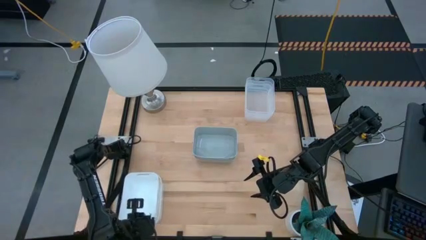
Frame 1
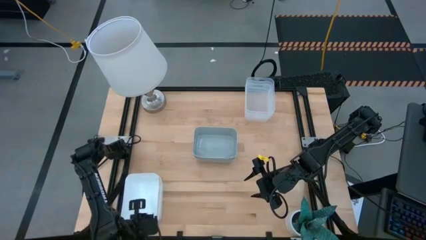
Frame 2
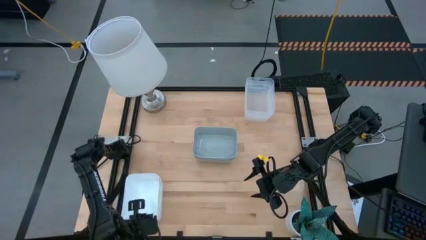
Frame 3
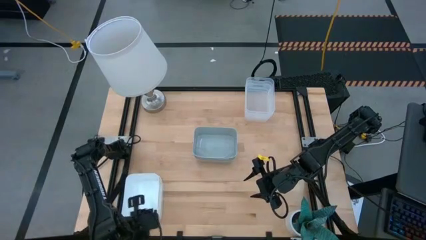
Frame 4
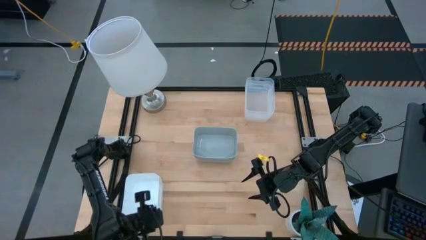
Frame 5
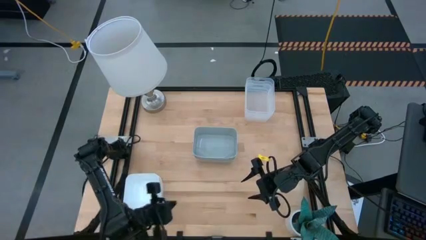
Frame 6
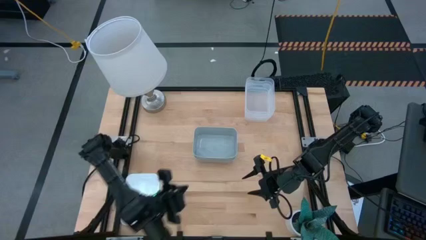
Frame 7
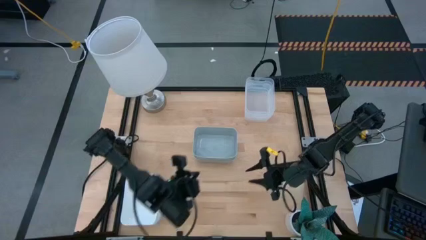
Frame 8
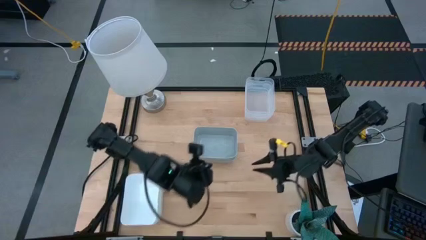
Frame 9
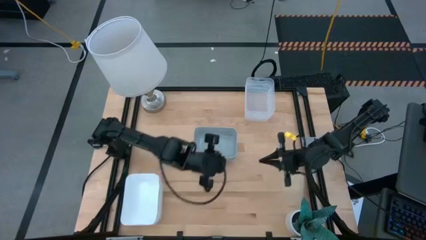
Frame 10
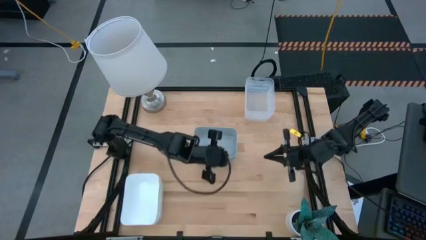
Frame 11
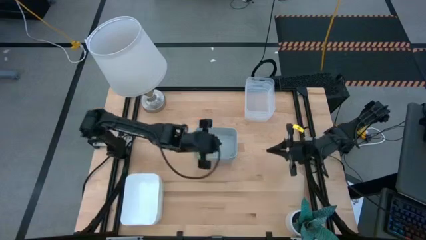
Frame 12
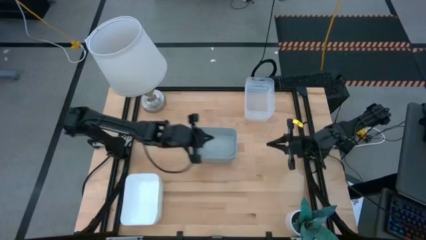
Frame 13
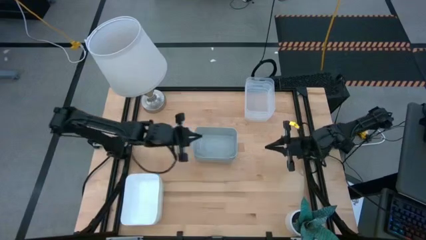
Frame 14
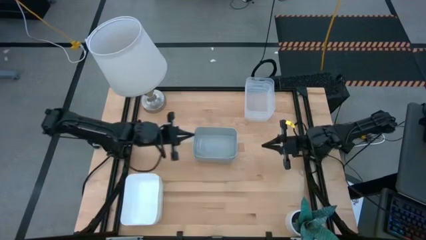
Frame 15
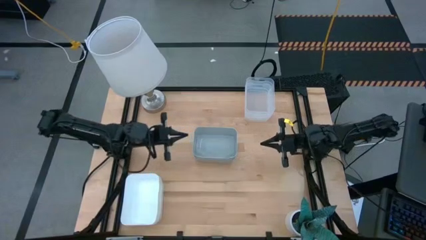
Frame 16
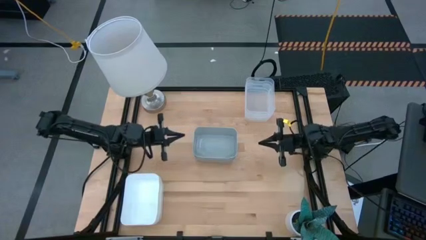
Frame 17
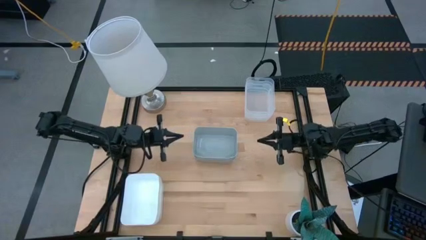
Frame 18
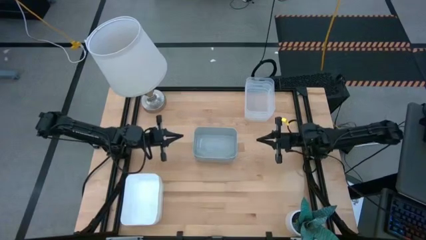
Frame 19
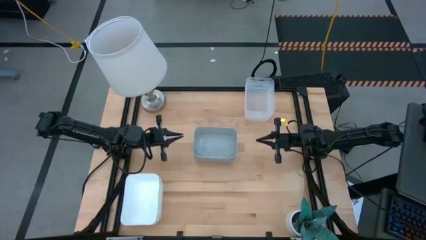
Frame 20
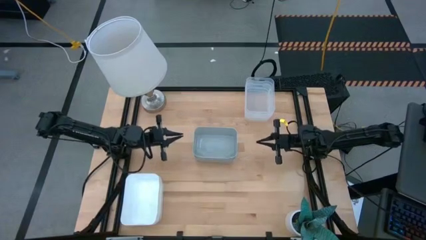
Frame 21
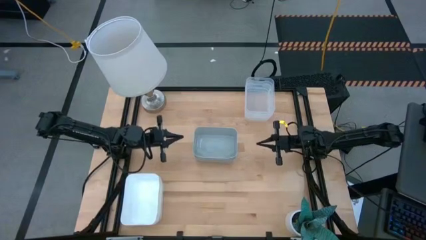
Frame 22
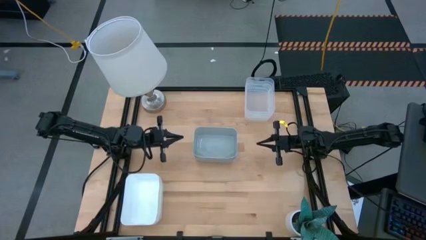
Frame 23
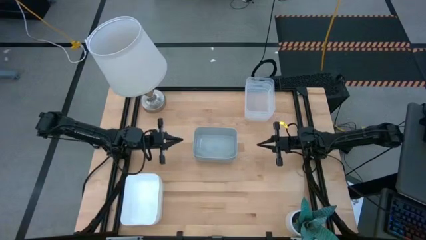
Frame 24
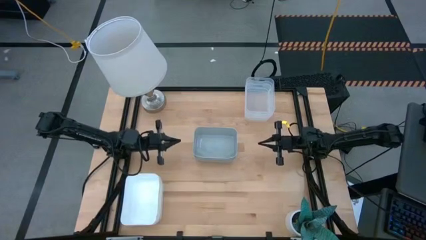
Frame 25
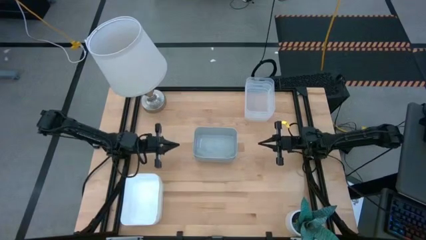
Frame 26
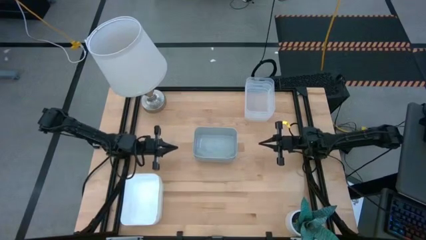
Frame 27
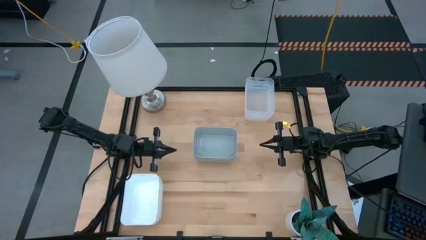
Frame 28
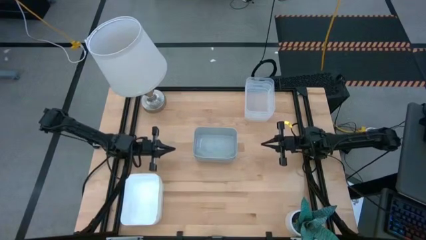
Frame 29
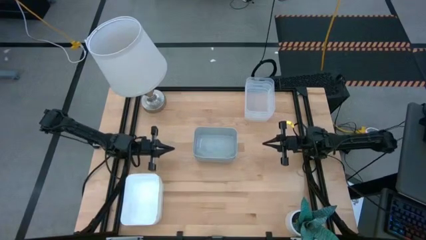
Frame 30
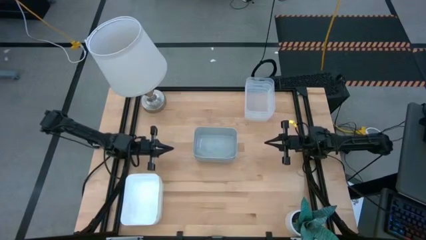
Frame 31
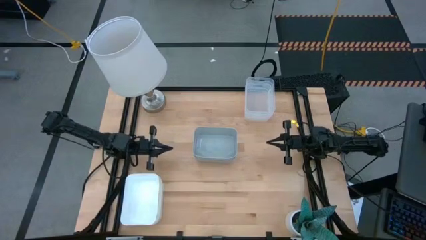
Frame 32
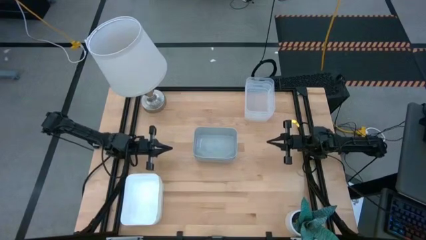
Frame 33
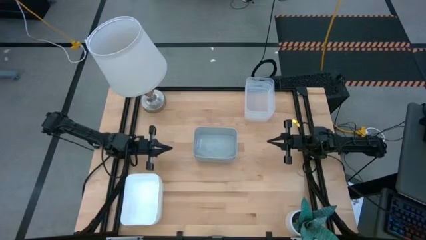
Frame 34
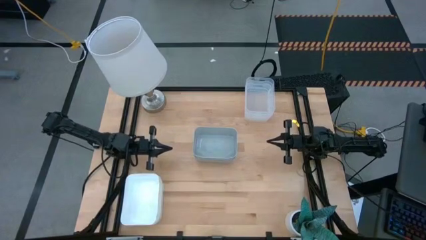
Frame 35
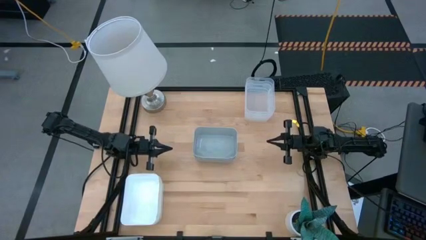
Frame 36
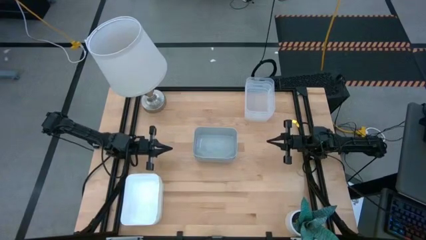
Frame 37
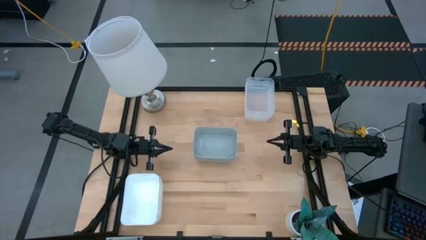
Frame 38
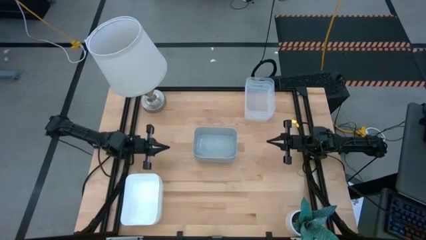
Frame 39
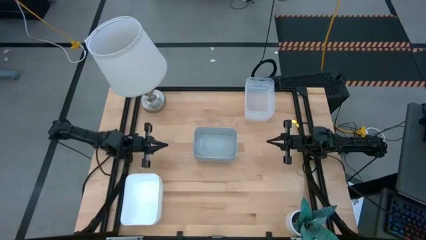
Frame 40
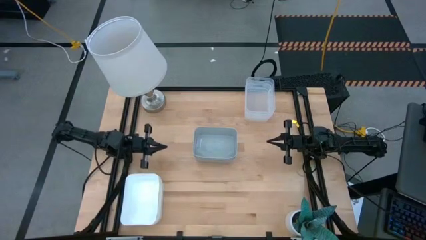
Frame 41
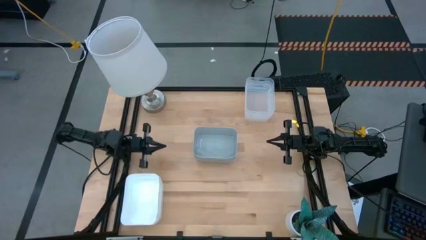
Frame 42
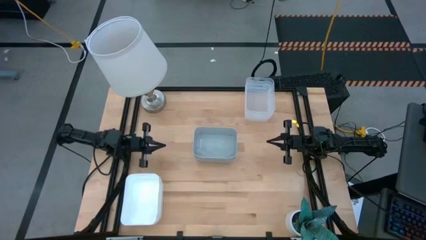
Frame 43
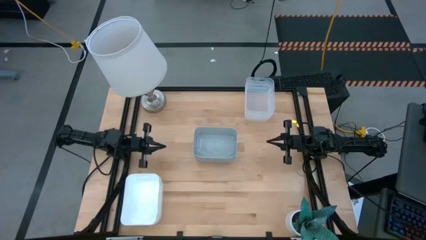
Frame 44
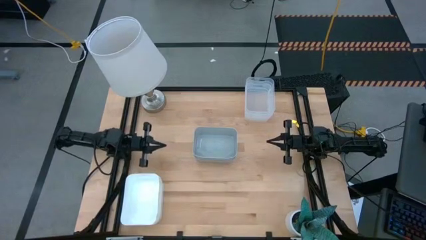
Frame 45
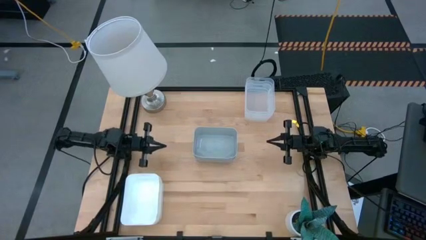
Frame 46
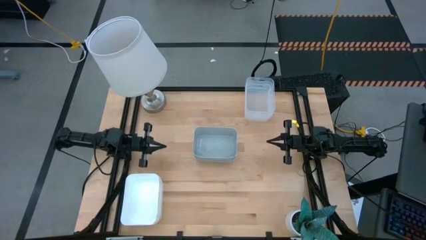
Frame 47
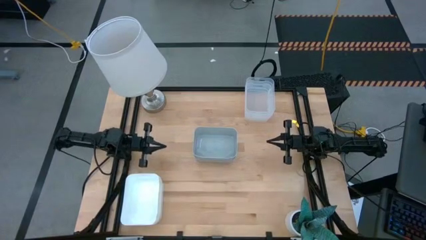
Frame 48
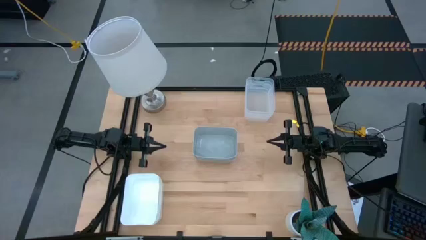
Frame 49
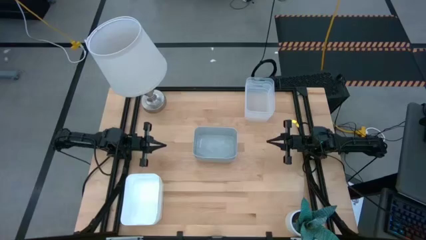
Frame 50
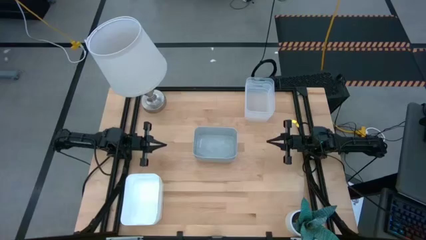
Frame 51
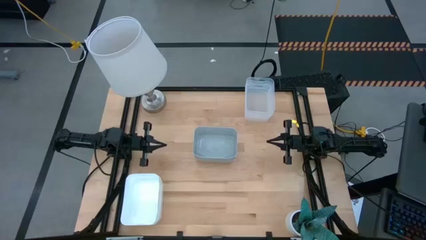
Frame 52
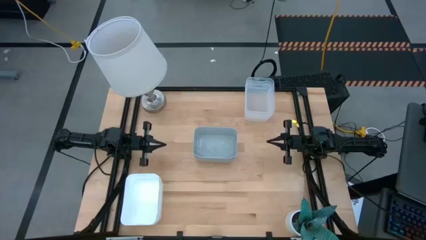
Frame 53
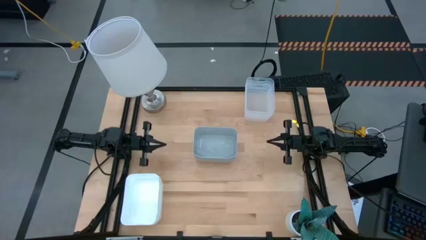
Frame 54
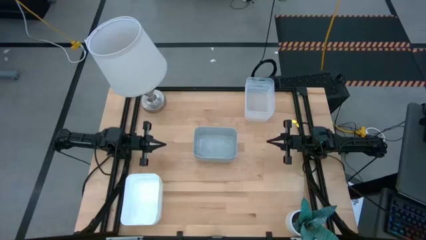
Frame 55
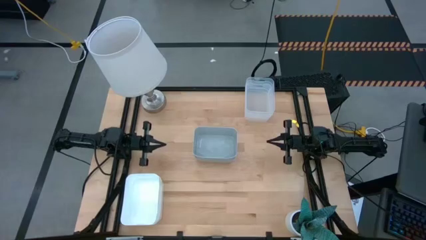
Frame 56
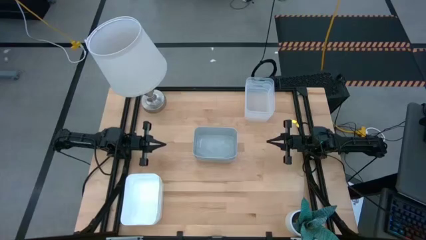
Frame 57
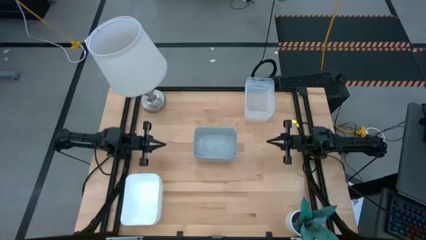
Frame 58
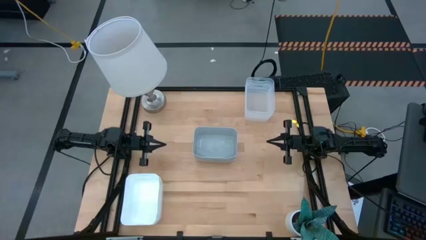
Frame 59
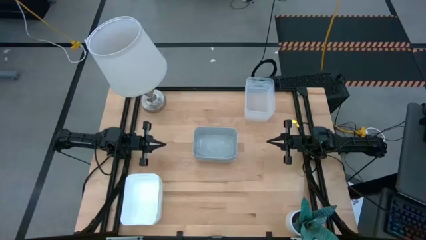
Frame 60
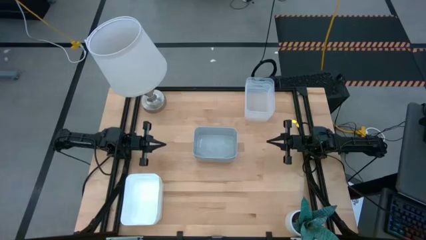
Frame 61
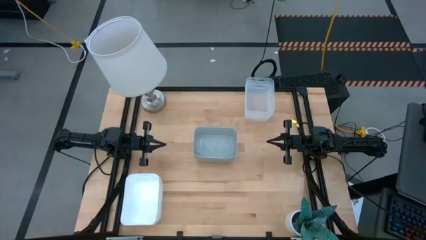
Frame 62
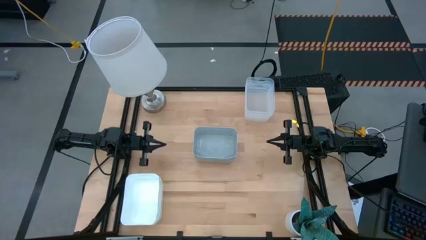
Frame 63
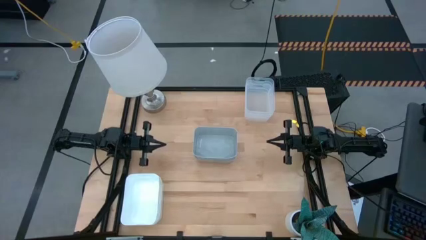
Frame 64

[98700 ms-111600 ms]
Return to Home Position
